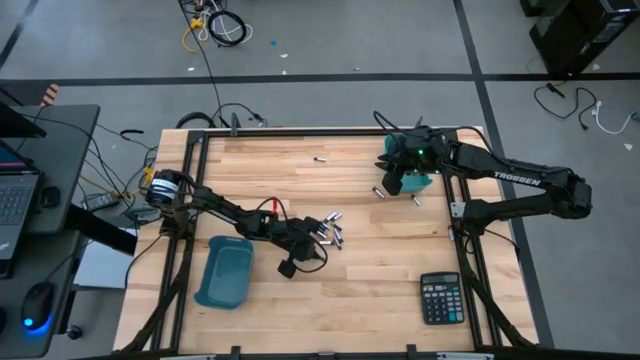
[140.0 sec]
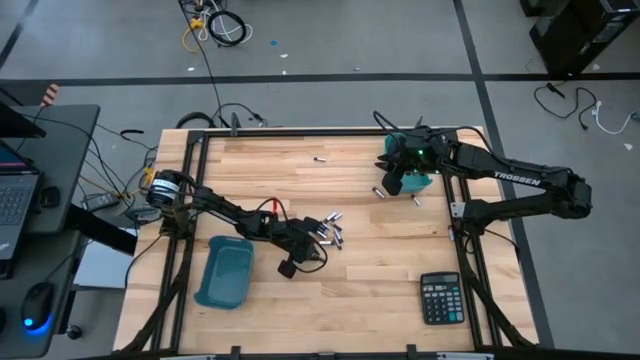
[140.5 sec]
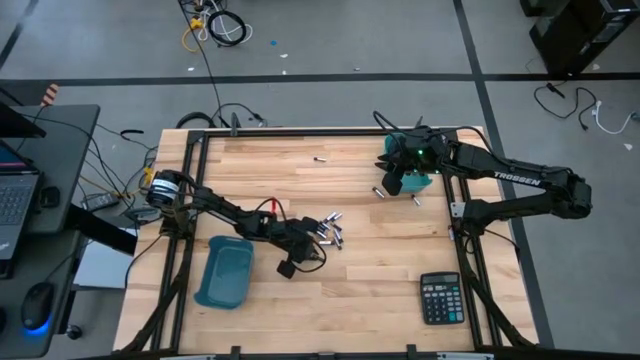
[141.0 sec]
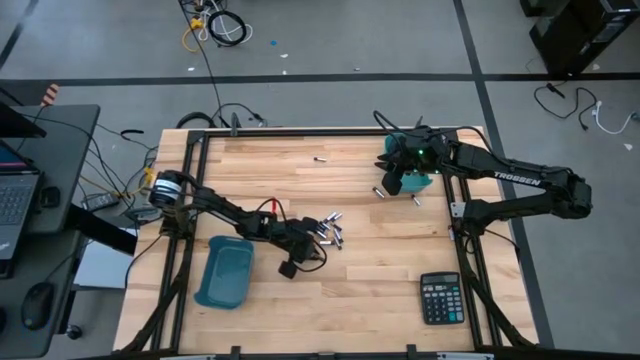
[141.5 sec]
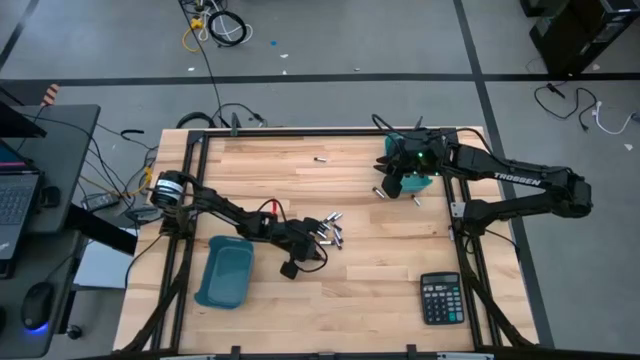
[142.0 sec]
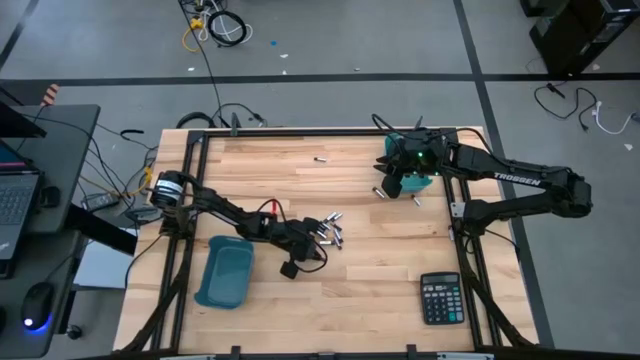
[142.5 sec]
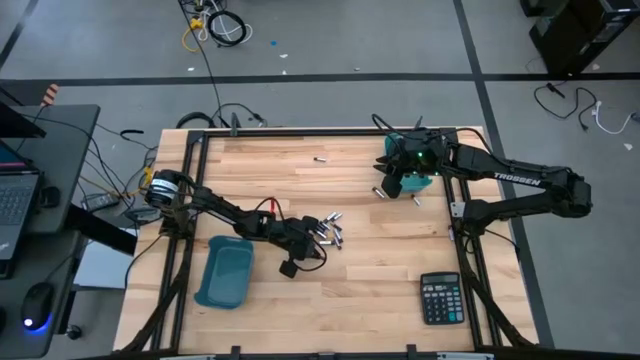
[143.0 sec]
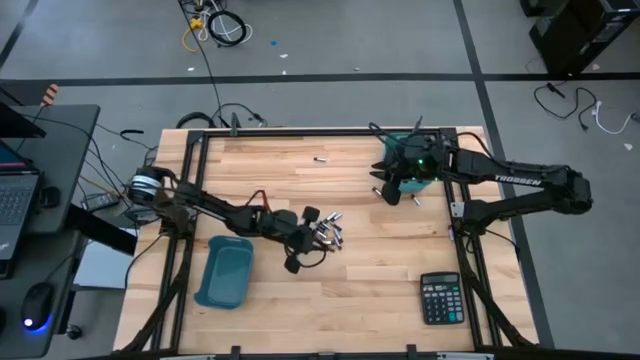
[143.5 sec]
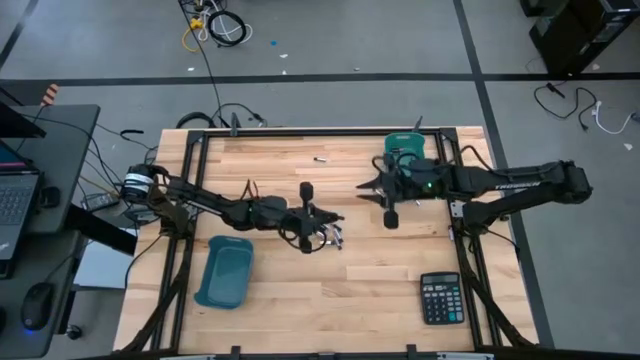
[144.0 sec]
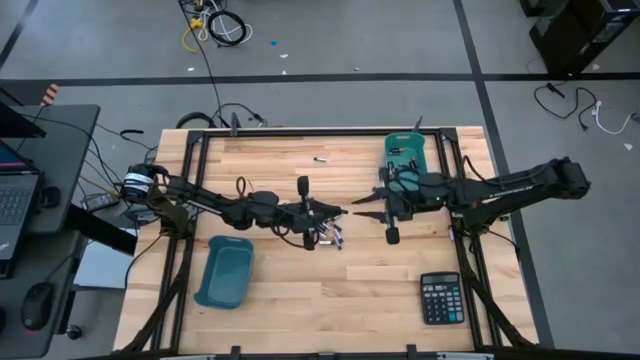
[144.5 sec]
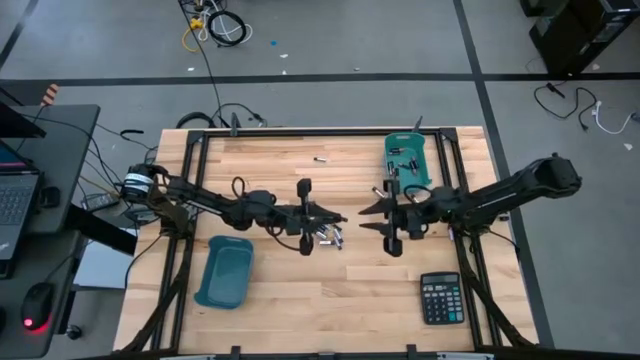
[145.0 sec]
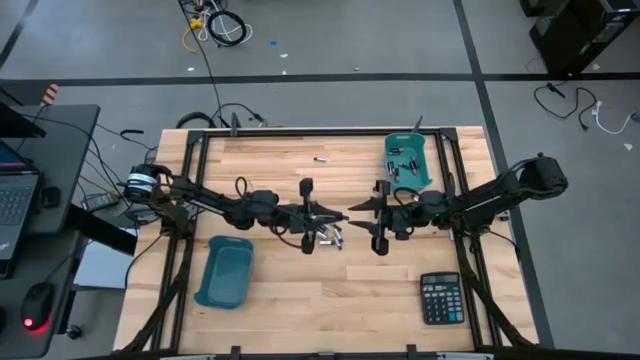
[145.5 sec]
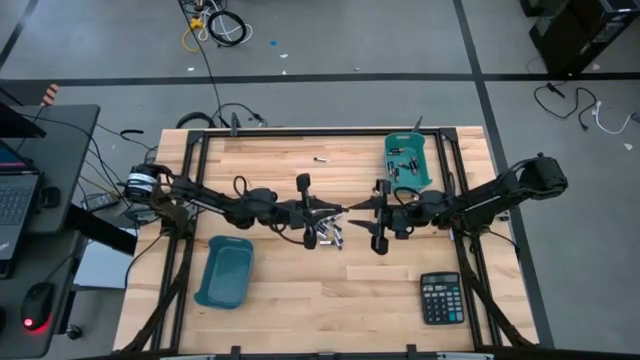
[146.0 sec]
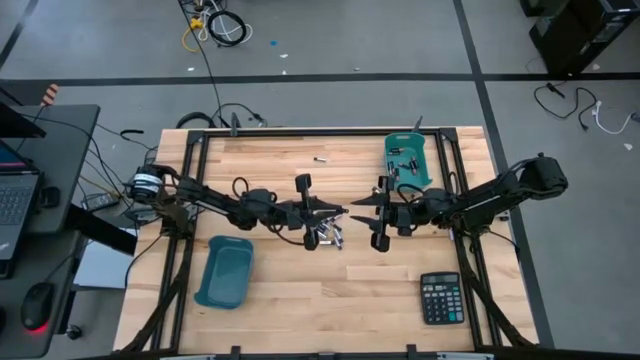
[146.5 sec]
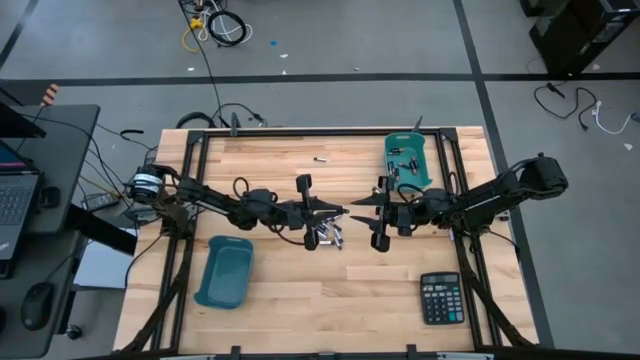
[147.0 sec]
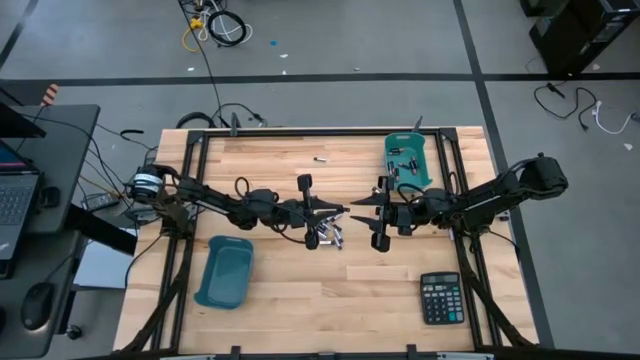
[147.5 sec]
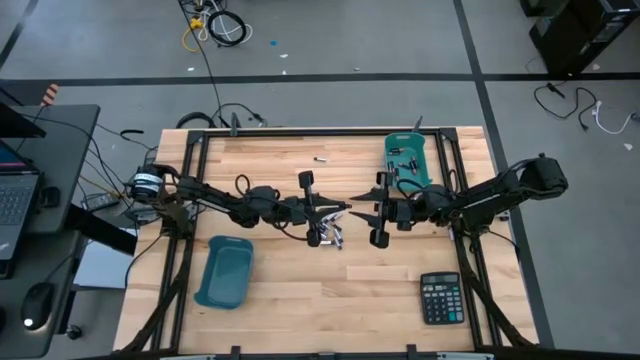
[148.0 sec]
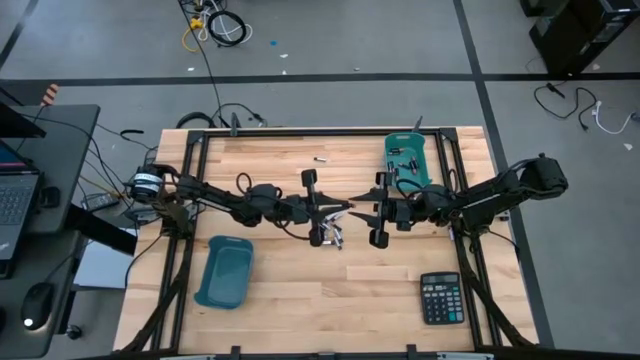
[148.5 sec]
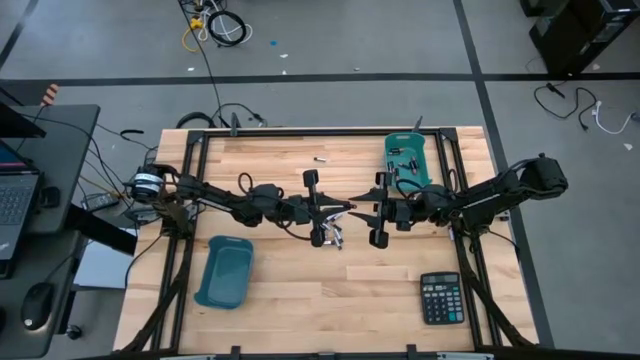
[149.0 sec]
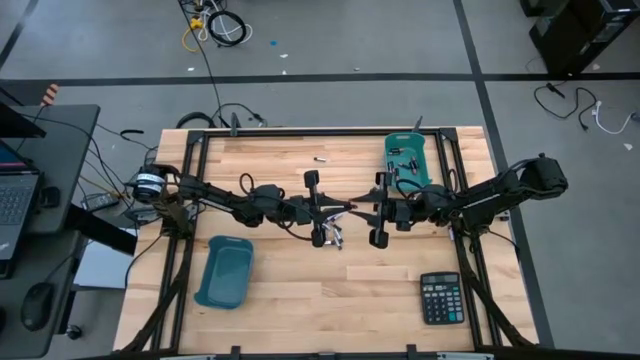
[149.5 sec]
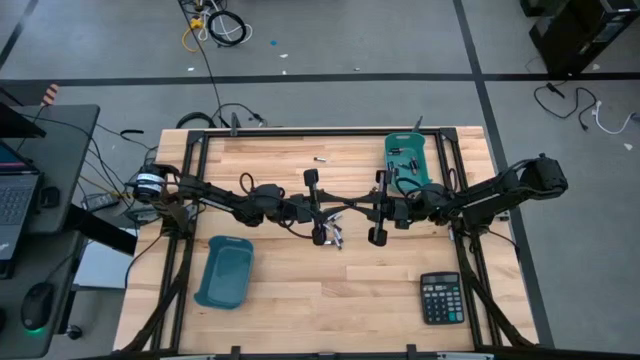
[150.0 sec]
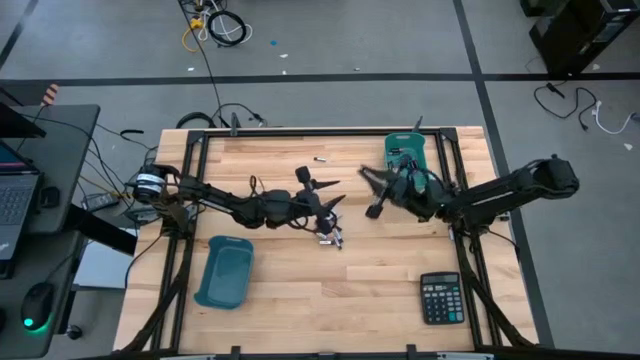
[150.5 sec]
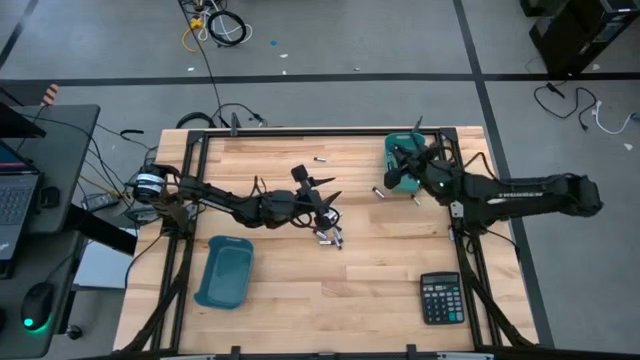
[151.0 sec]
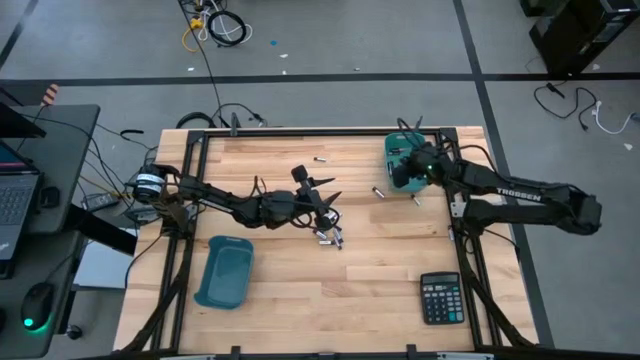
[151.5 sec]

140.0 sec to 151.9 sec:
Task: Sort batteries
Put the black battery into the green bin

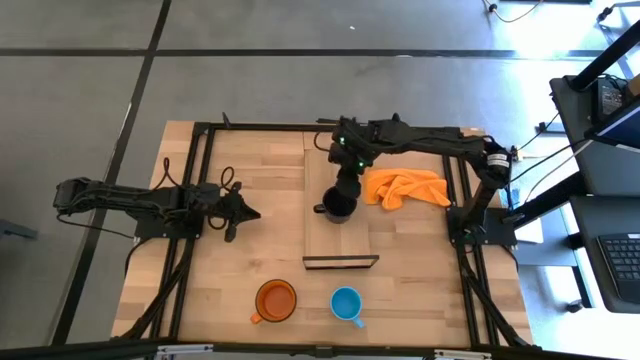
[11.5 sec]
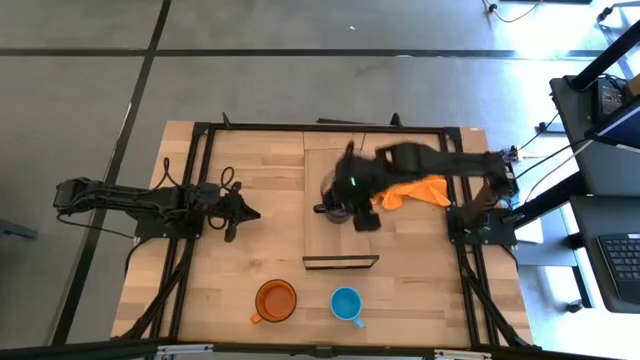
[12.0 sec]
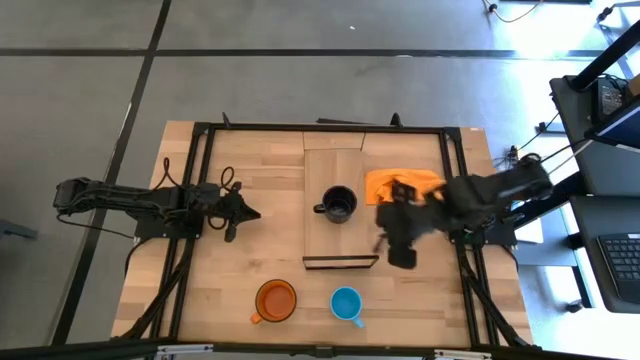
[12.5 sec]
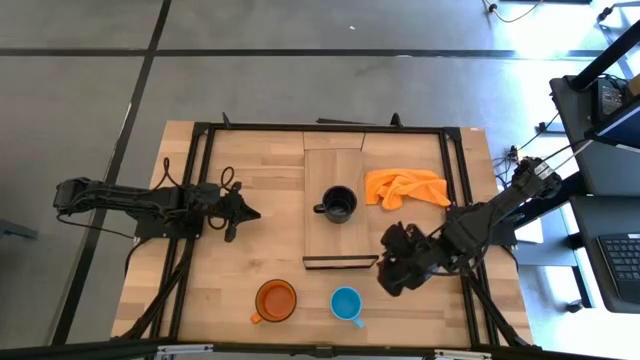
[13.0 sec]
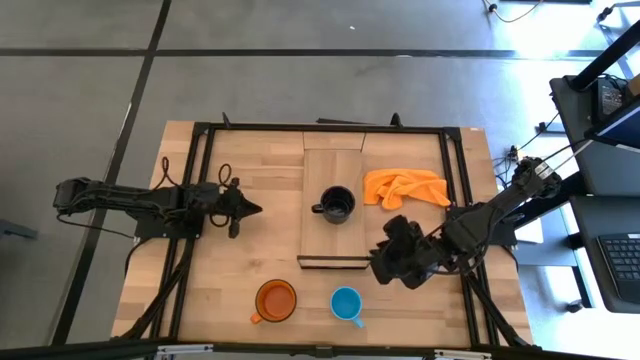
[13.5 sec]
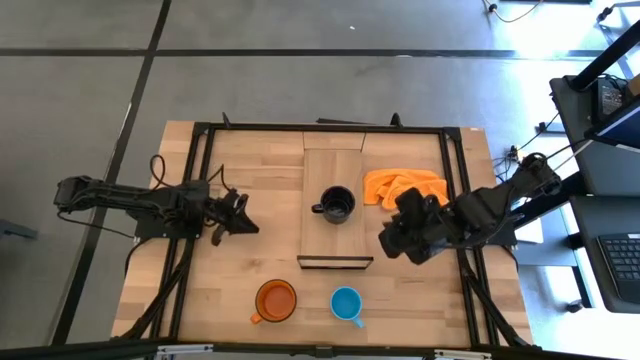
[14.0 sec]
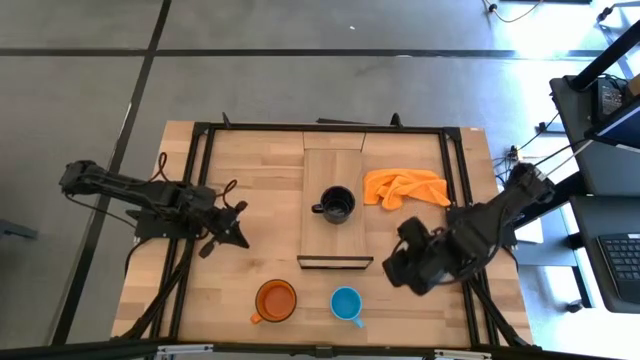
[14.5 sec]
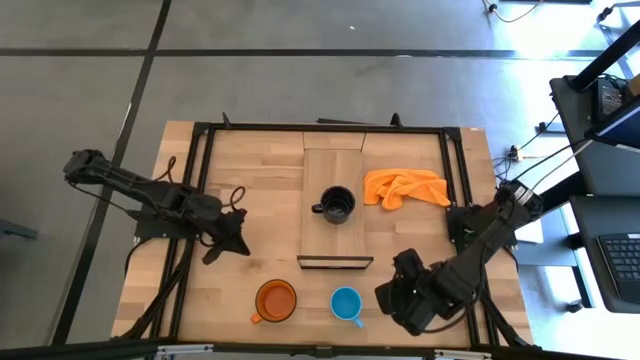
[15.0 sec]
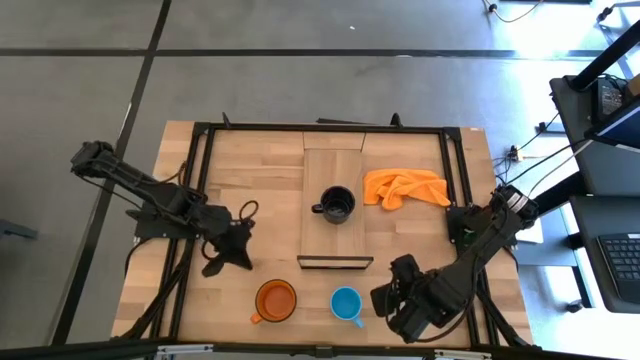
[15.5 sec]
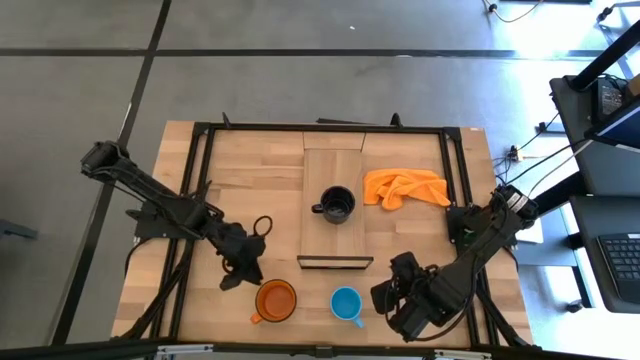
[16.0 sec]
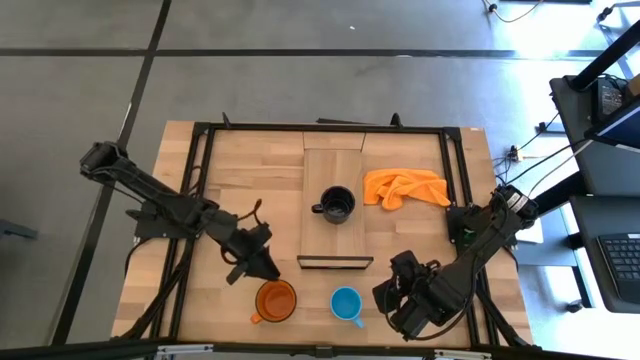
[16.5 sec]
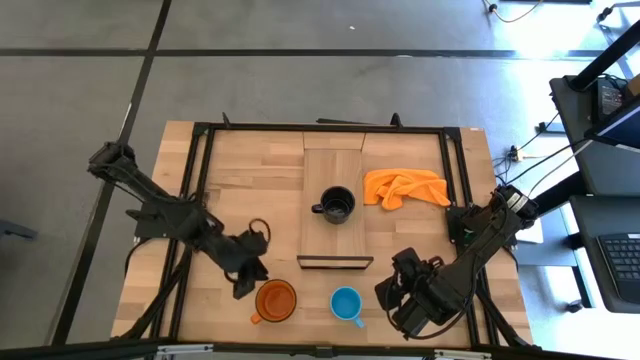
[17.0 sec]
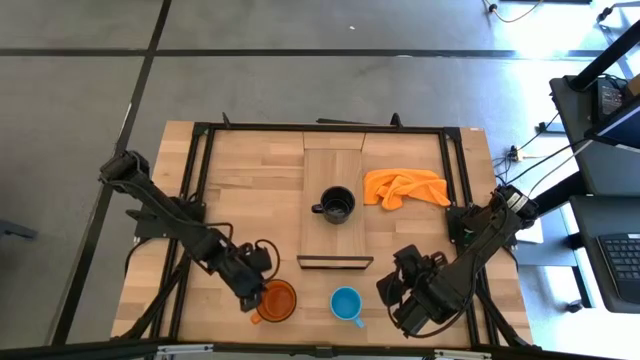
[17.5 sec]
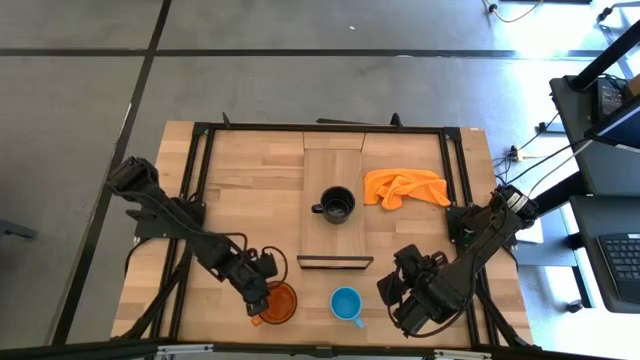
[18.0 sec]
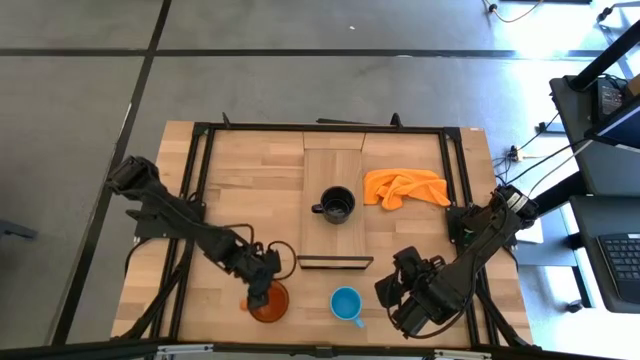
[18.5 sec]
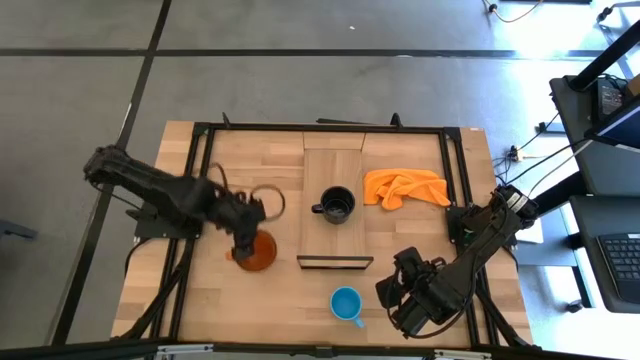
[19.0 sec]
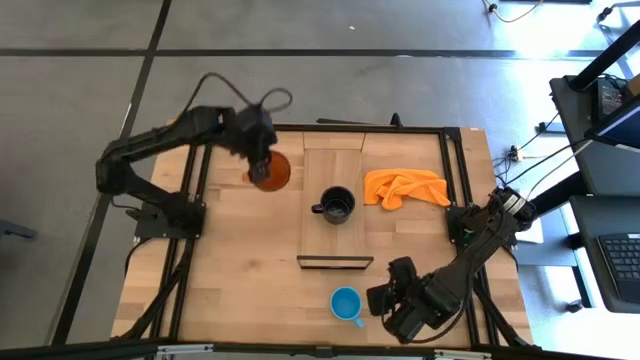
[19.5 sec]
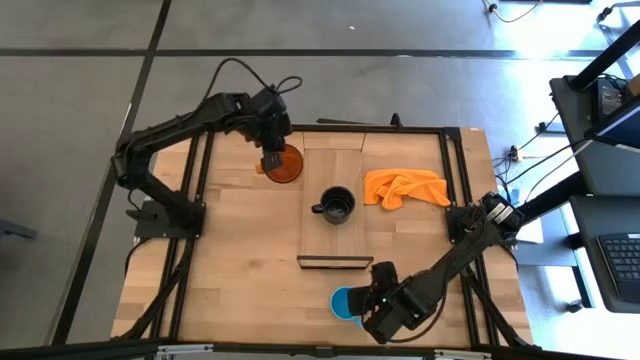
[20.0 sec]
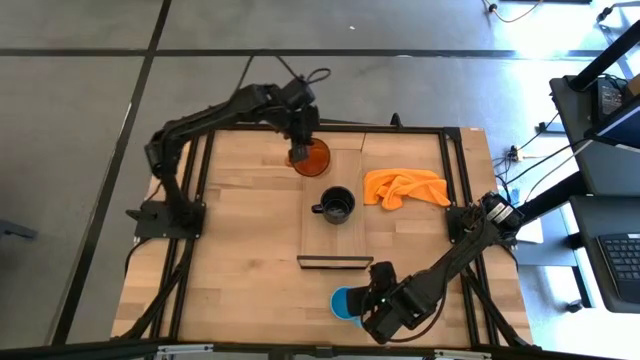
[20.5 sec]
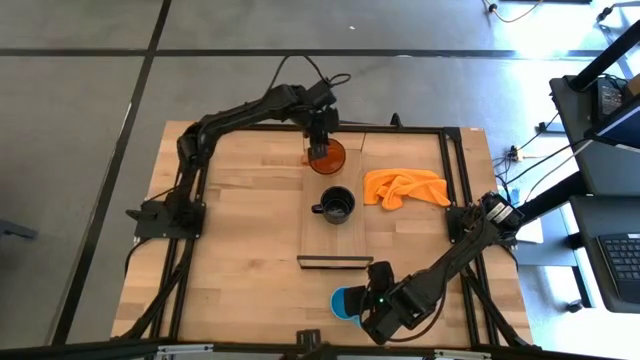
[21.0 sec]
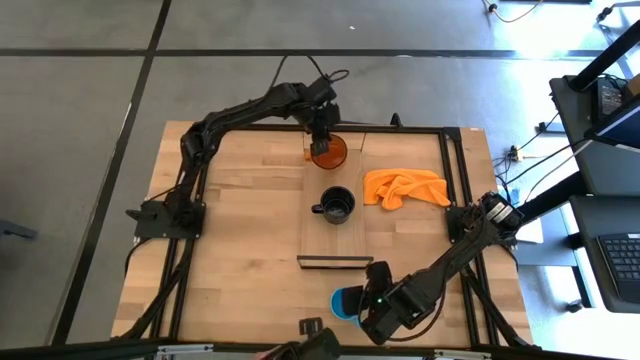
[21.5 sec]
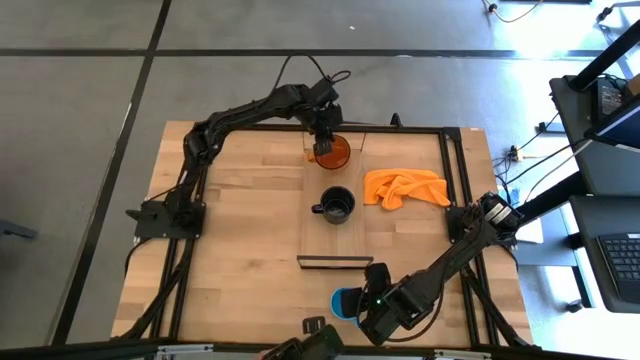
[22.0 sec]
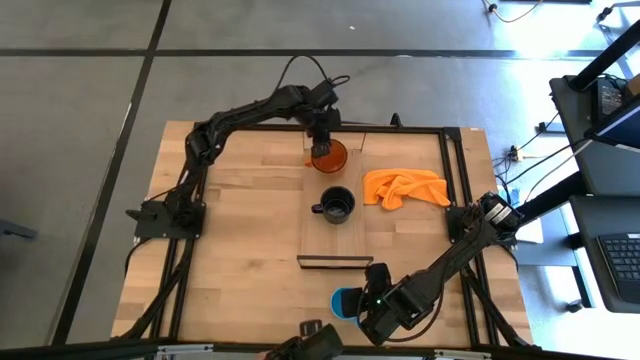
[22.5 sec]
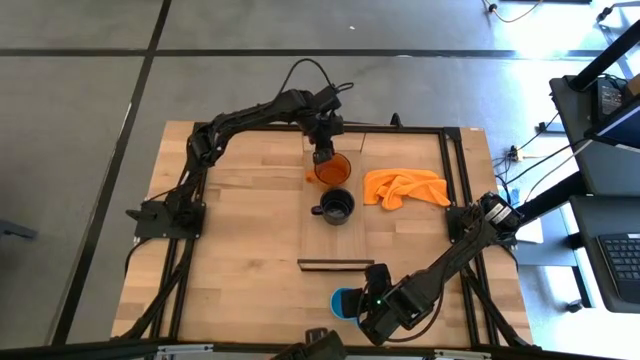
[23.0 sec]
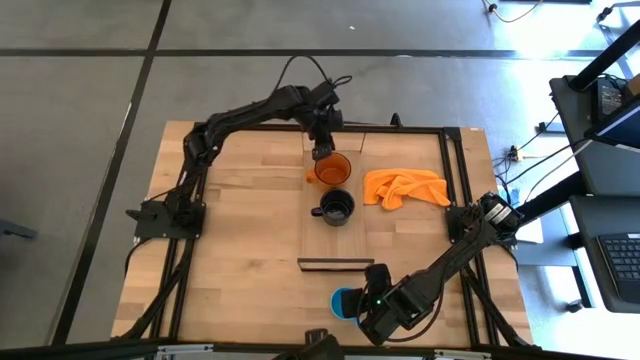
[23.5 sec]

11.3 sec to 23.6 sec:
Task: Stack small to large cups/mugs on shelf
Put the orange mug on the shelf
